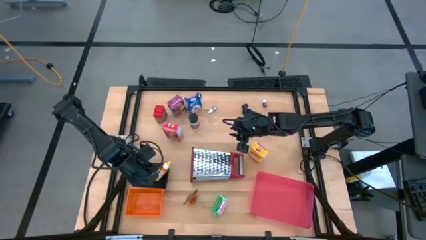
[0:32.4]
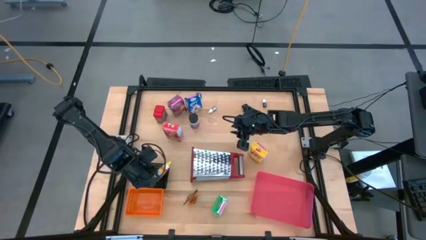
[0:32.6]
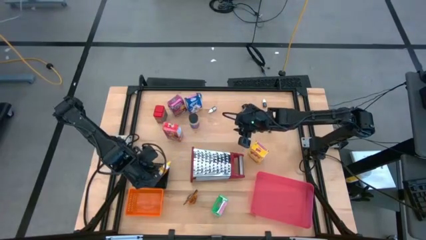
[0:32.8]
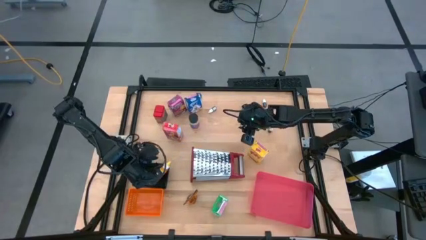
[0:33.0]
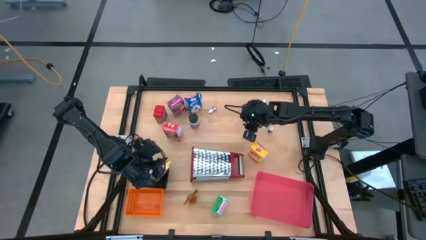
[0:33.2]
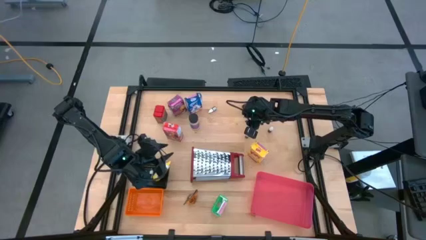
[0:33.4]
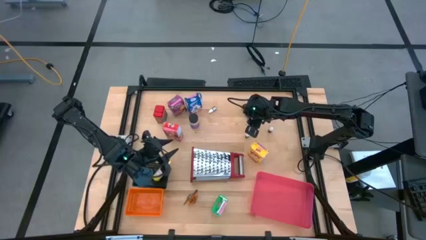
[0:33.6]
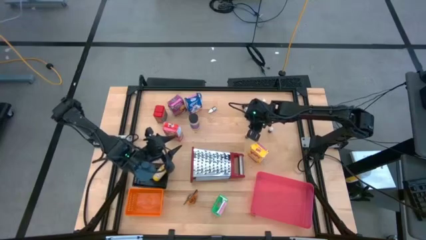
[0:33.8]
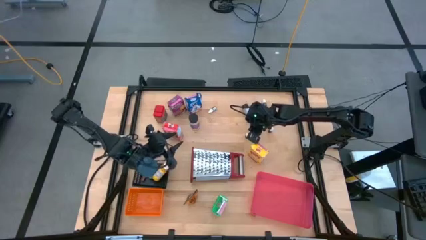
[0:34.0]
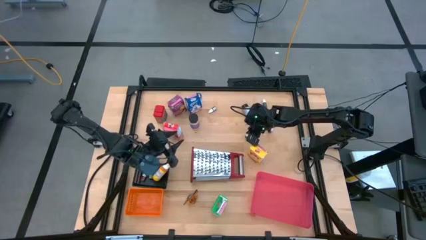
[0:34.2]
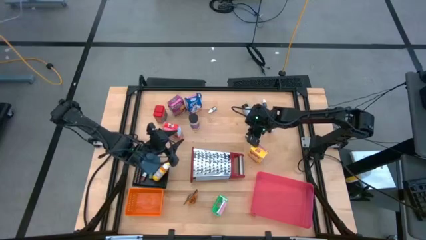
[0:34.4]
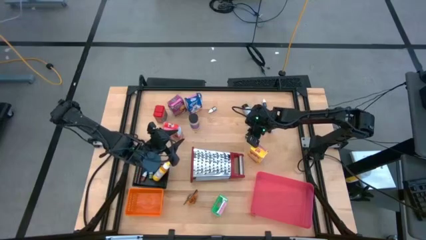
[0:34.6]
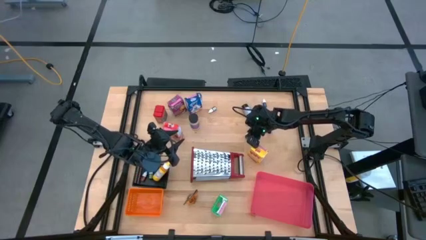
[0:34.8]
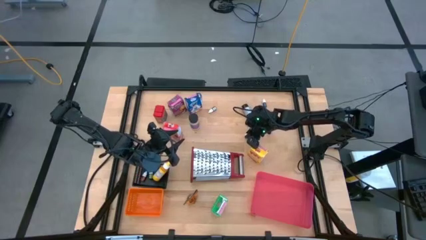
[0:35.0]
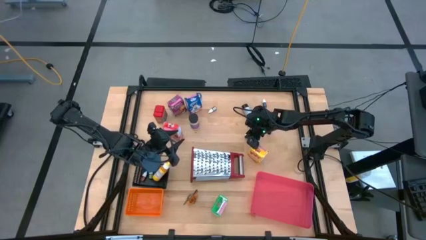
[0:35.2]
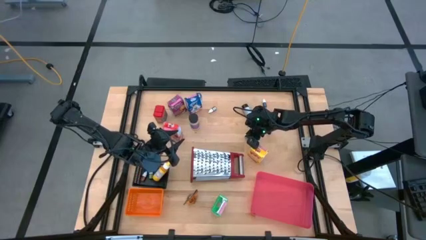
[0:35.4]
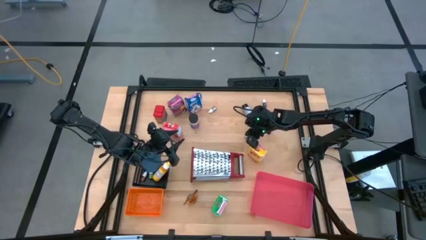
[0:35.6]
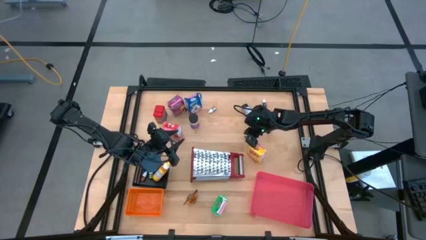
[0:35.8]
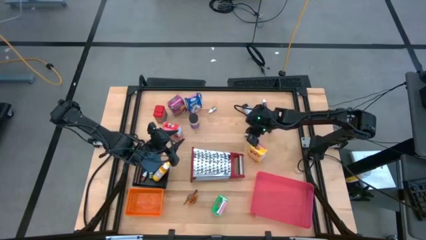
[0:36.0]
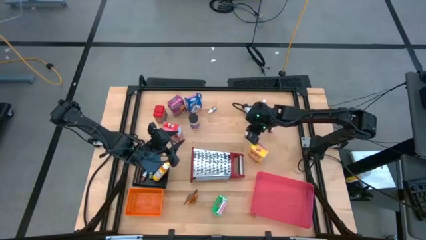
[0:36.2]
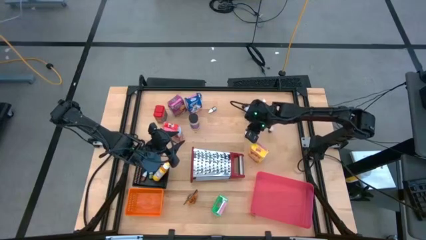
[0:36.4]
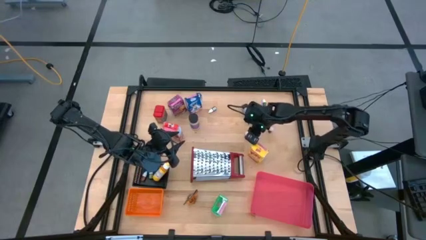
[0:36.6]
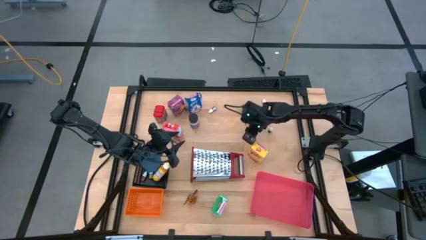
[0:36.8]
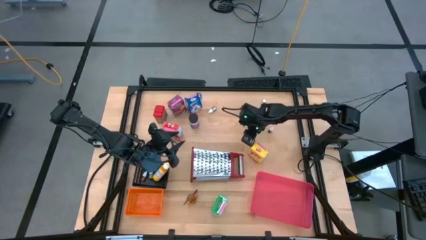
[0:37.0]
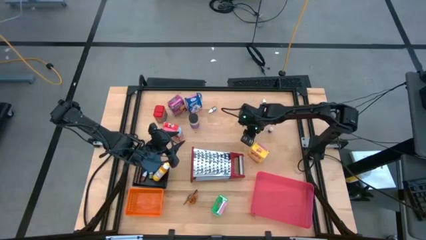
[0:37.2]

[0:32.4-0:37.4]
Task: Pick & Place Kitchen Items
Put the small brown food coloring bottle into the black bin

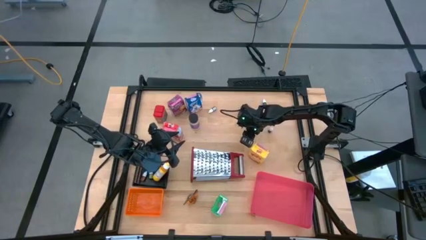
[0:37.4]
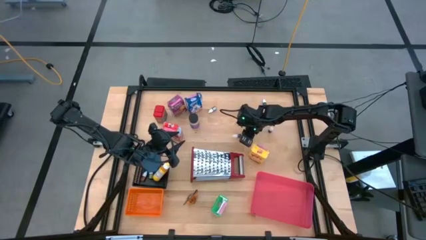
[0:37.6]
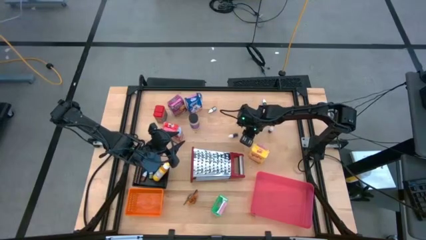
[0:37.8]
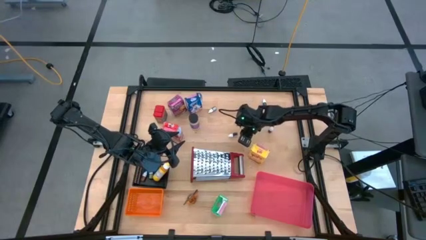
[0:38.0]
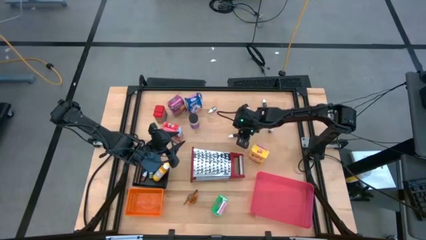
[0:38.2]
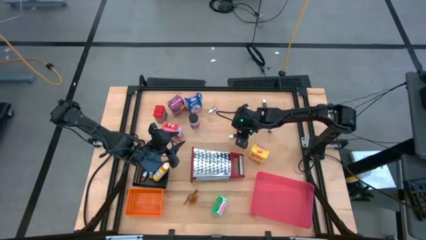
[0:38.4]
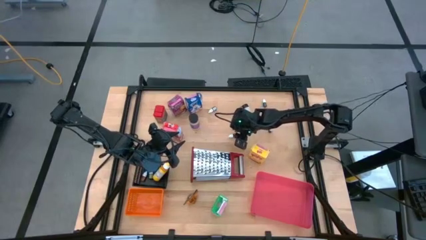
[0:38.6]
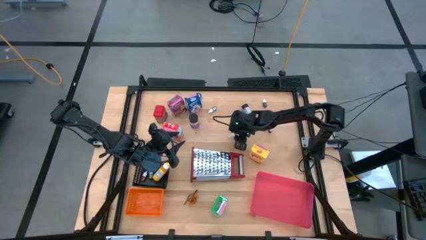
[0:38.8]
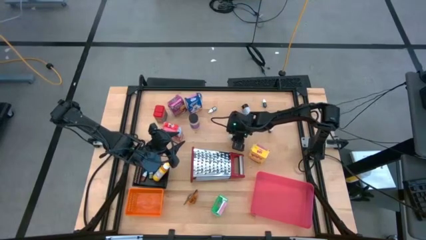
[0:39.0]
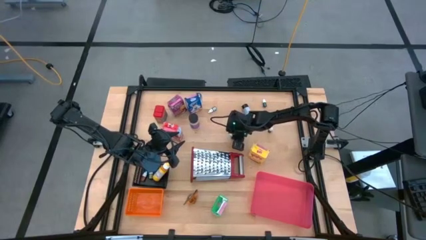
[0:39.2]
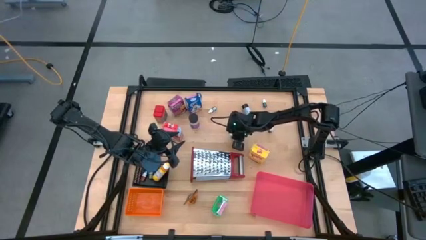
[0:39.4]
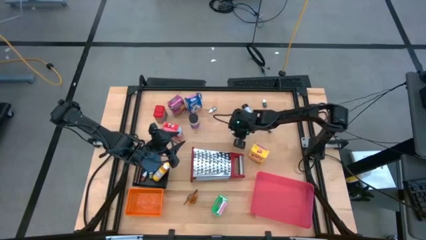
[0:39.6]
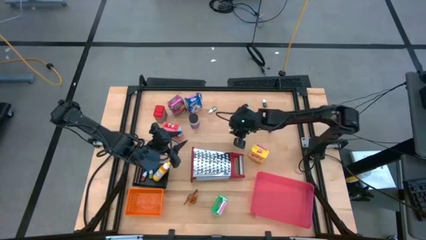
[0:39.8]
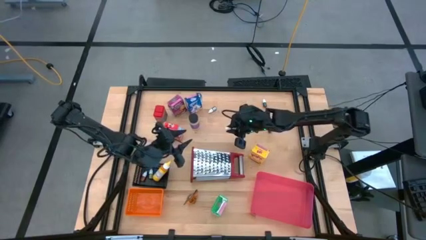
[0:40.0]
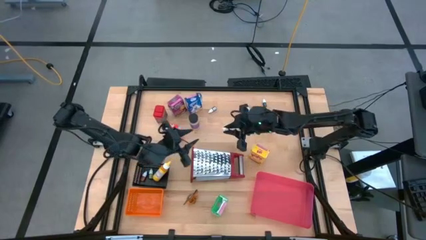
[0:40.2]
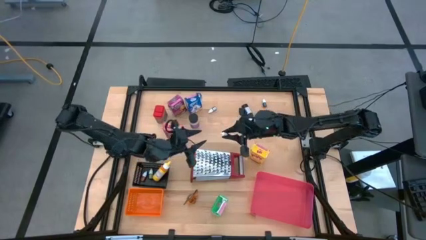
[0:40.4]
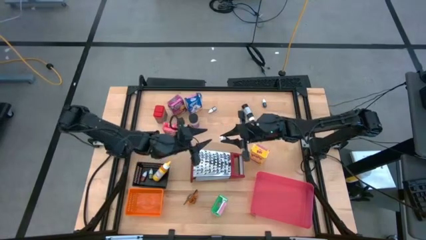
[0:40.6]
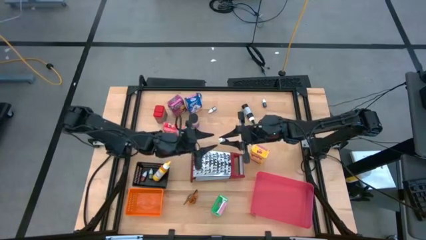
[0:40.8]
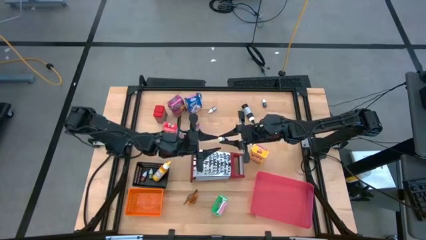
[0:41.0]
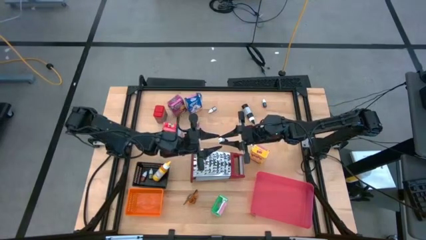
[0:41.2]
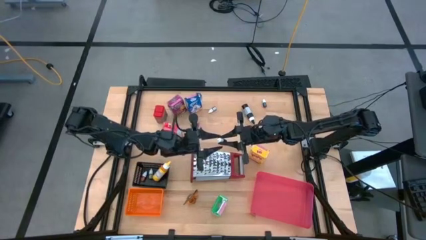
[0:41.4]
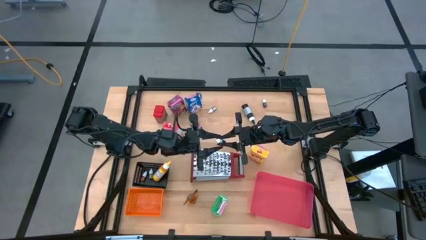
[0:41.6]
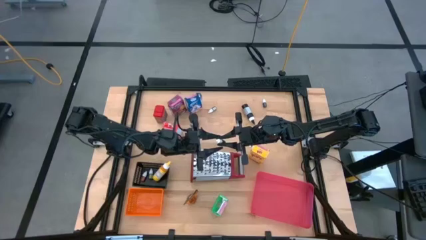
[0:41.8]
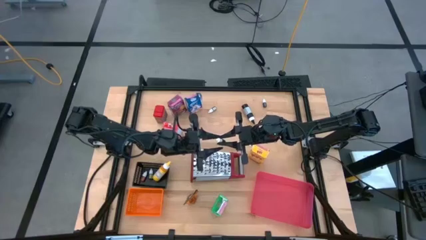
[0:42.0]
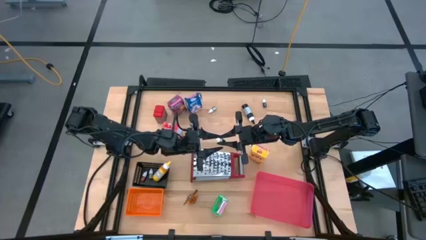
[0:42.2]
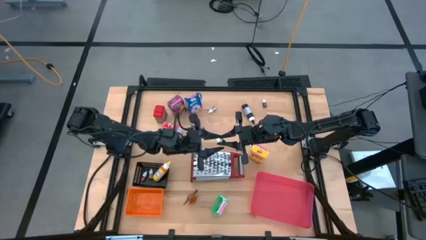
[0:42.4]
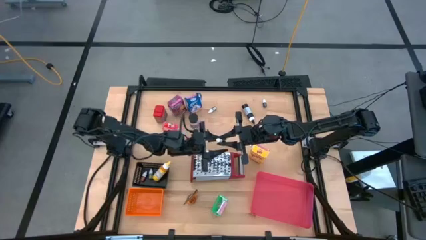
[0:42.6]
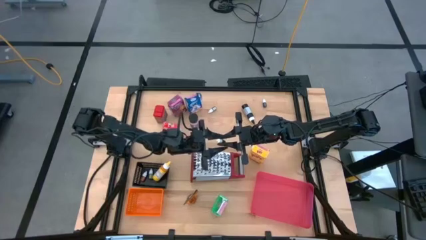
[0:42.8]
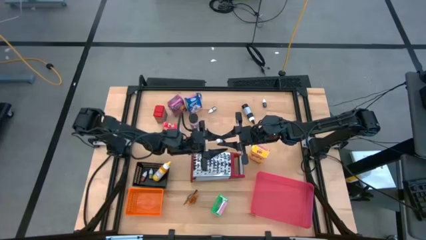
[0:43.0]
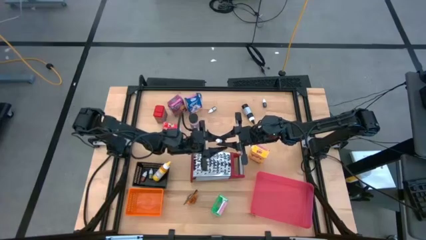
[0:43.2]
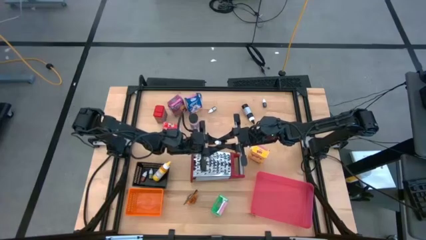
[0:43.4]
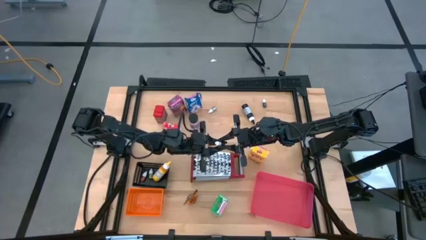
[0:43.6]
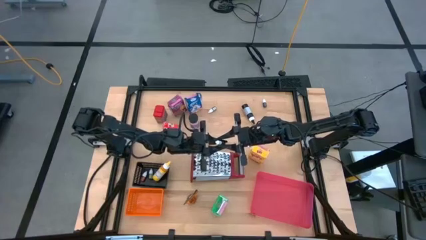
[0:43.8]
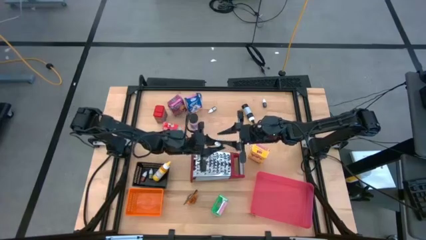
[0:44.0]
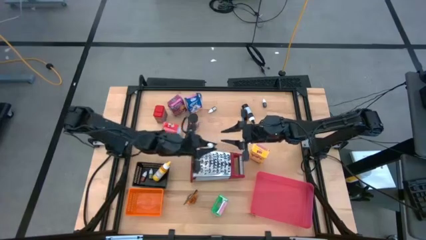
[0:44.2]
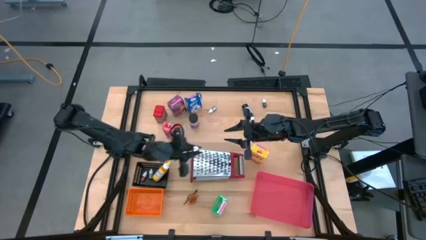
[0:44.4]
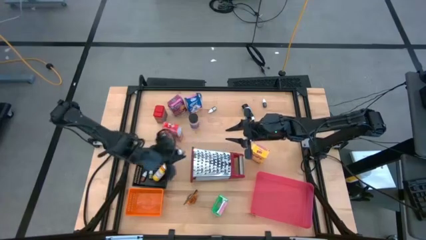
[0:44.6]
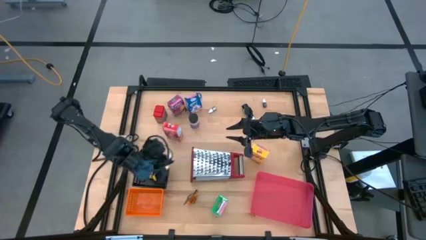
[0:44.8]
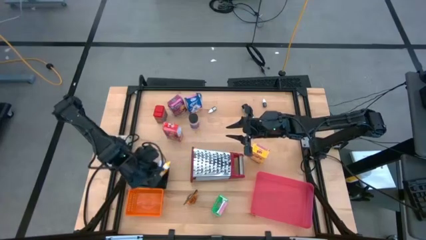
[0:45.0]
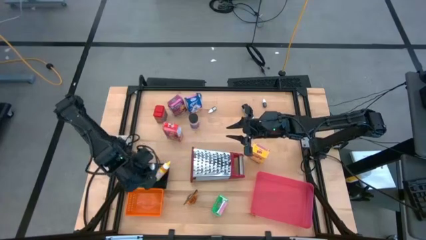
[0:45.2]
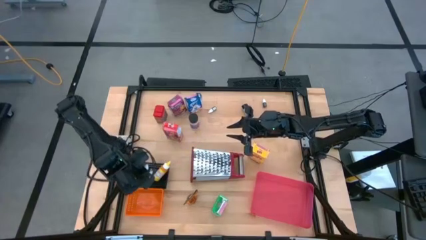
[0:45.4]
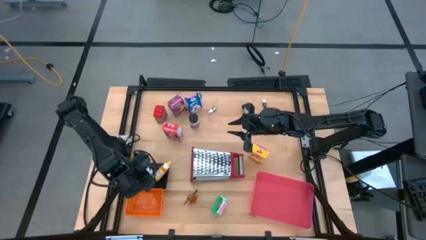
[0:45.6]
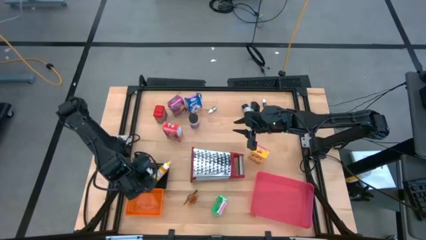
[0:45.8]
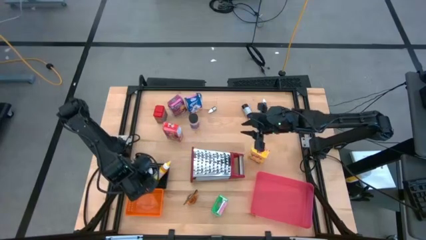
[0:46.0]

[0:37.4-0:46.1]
Put the small brown food coloring bottle into the black bin

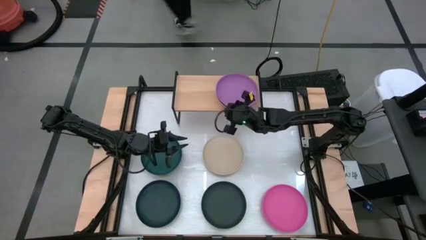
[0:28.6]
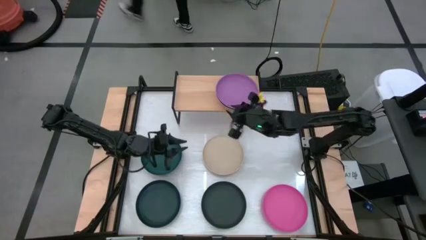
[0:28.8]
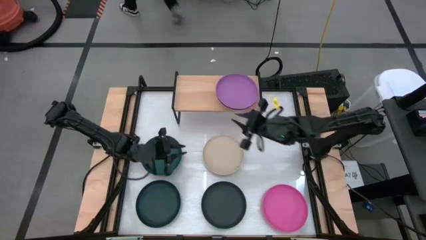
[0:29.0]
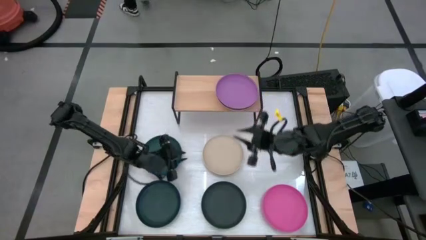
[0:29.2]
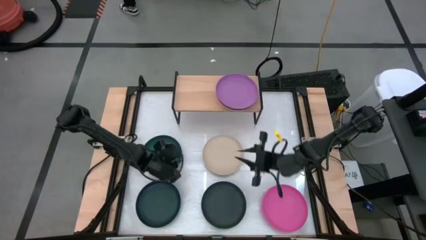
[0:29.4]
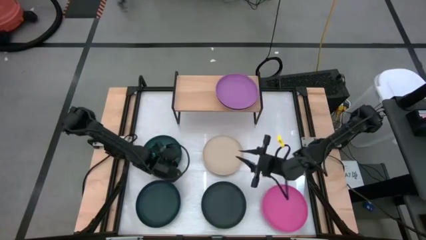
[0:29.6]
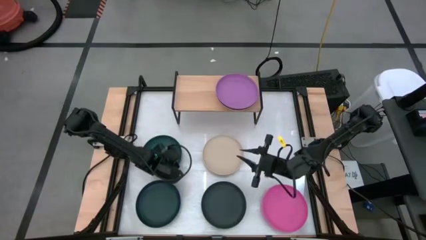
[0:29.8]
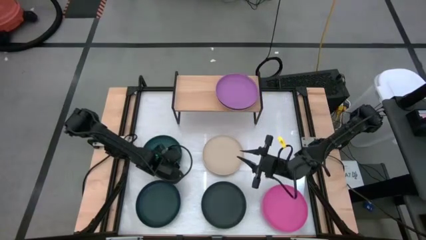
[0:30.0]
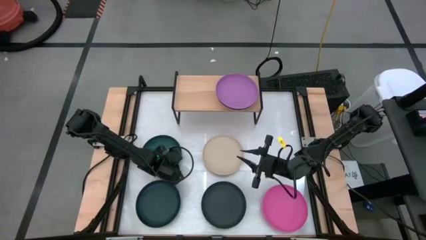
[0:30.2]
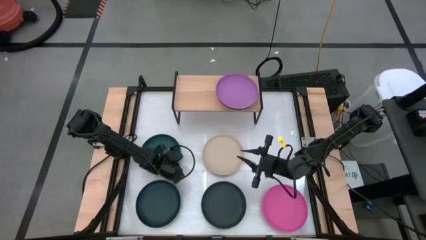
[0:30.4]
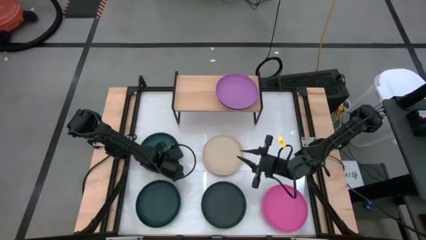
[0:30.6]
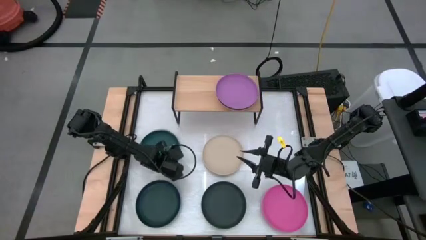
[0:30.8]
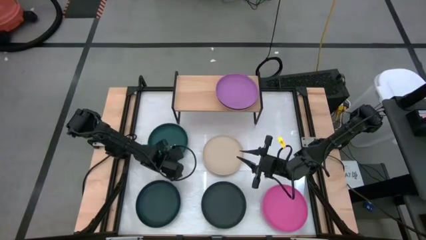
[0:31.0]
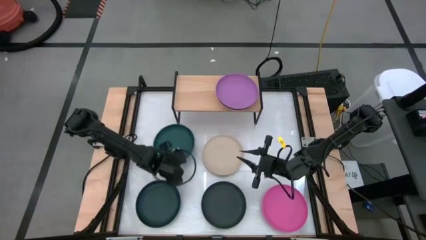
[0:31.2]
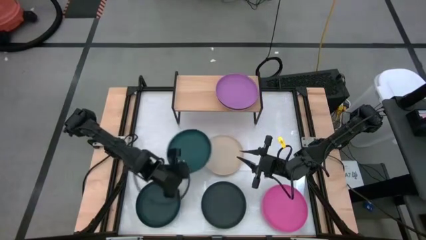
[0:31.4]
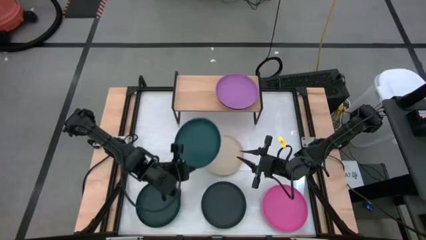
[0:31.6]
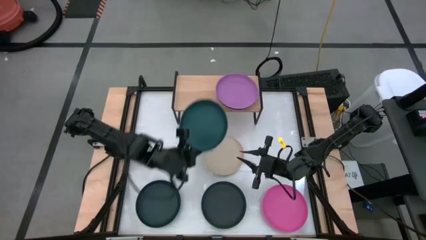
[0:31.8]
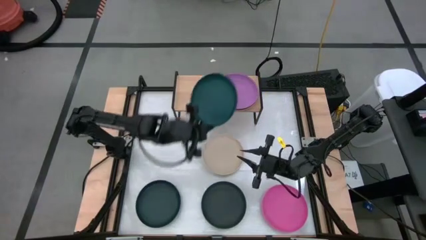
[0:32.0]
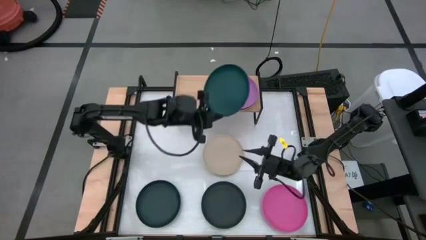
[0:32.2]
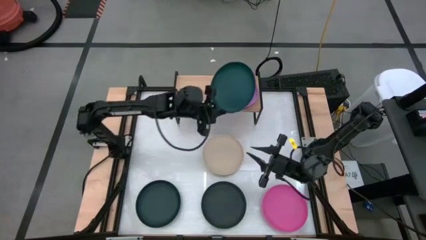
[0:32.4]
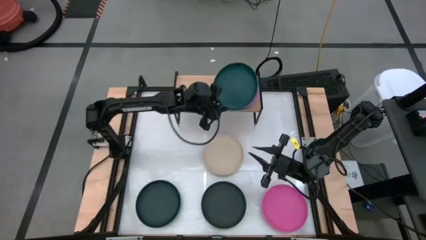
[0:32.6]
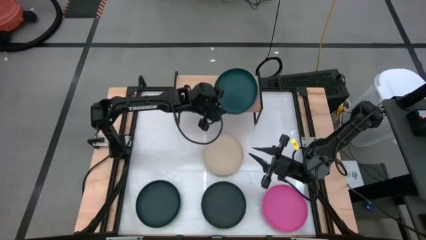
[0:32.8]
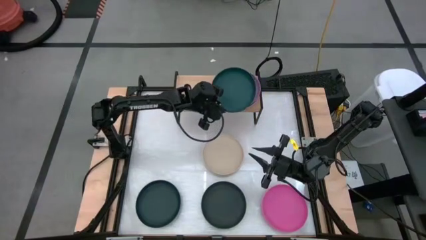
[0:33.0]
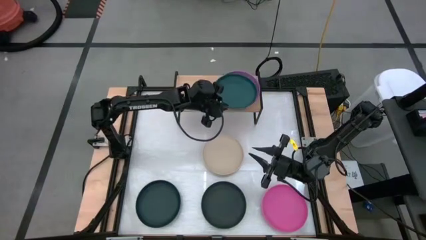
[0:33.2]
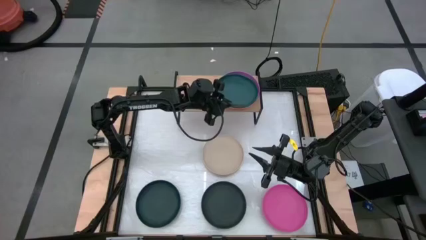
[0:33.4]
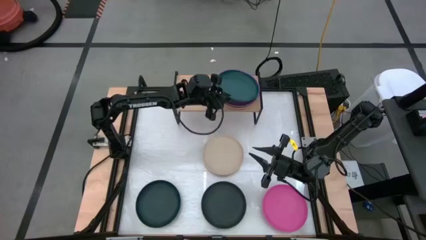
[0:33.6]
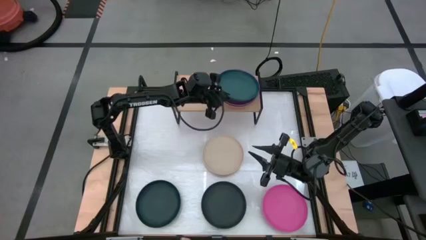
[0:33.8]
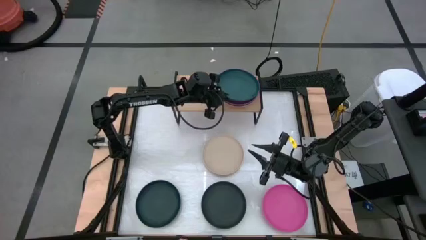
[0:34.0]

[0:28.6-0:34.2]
Task: Place and stack plates onto a shelf
Stack the dark green plate on top of the purple plate on the shelf
